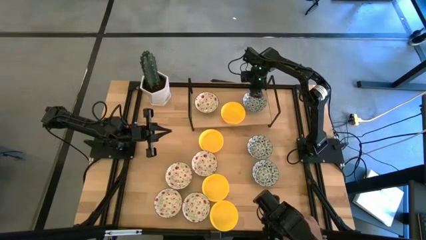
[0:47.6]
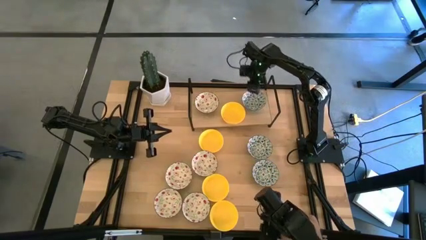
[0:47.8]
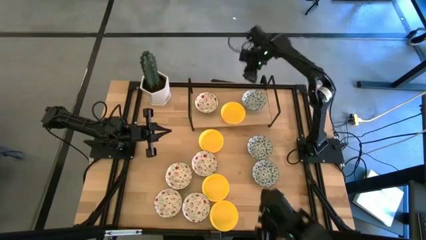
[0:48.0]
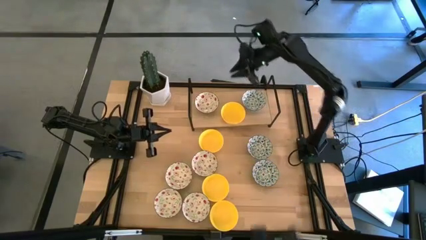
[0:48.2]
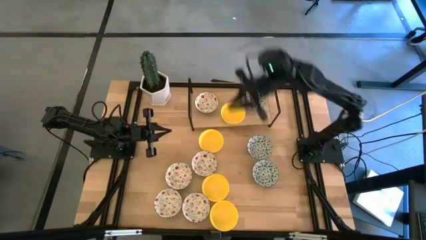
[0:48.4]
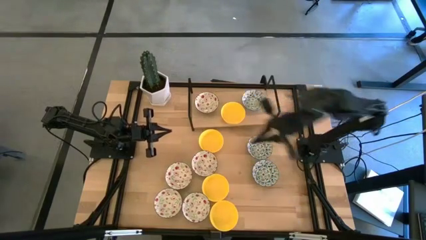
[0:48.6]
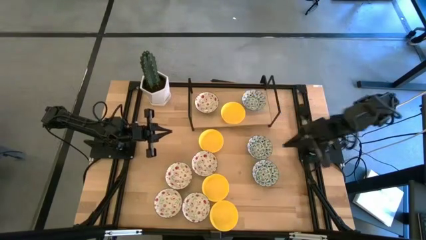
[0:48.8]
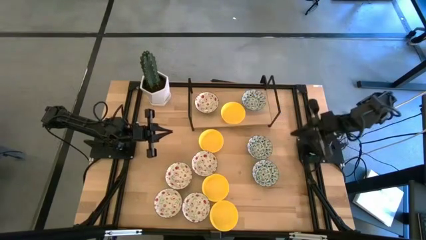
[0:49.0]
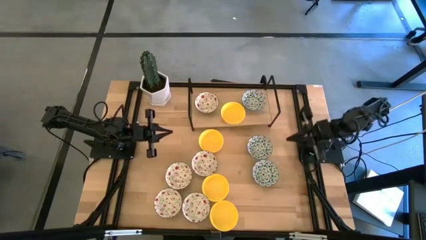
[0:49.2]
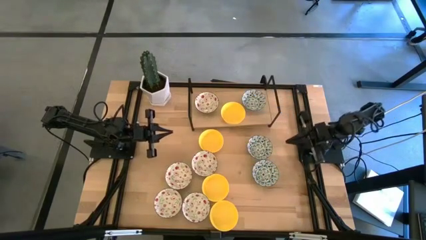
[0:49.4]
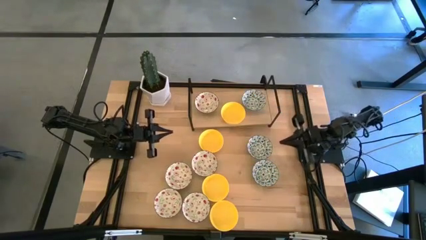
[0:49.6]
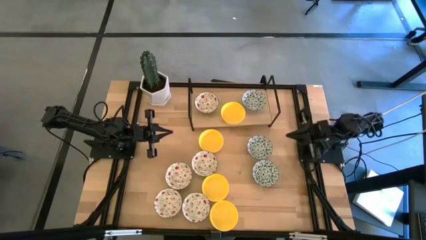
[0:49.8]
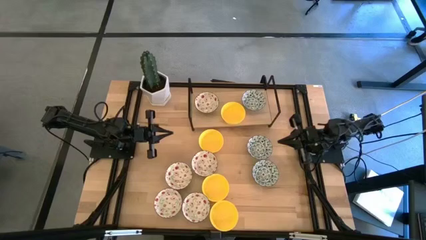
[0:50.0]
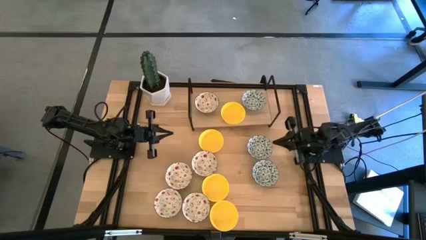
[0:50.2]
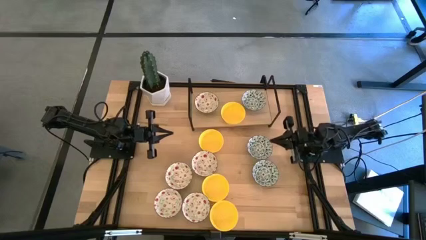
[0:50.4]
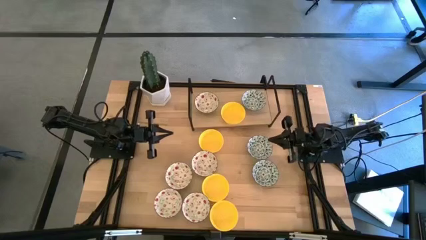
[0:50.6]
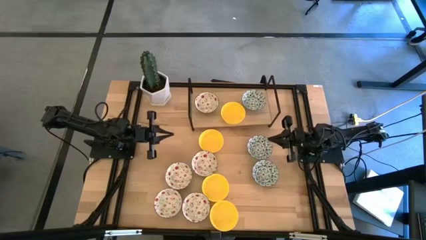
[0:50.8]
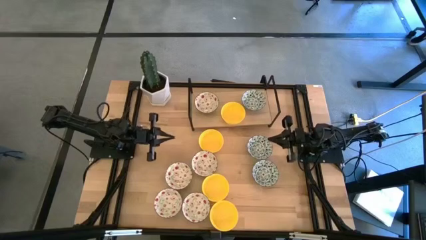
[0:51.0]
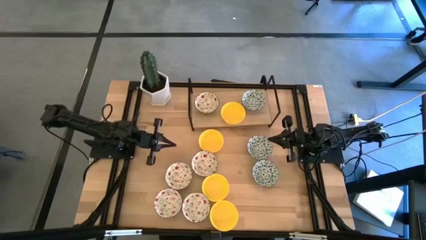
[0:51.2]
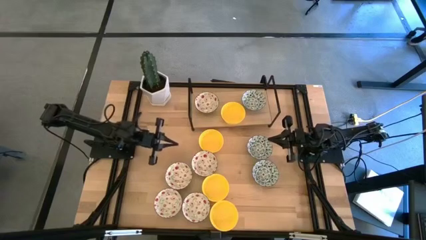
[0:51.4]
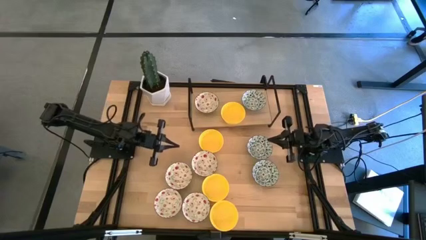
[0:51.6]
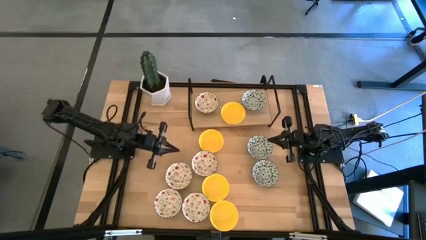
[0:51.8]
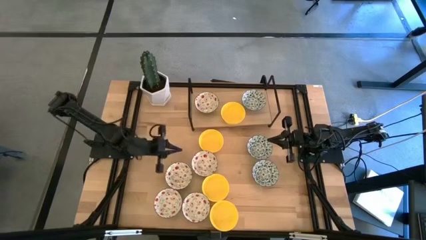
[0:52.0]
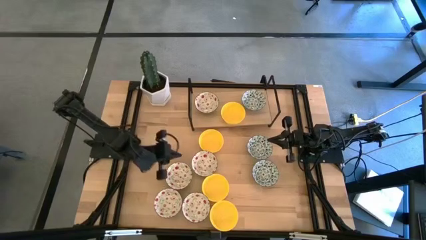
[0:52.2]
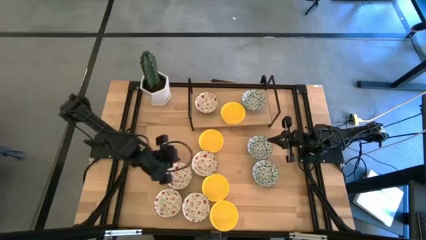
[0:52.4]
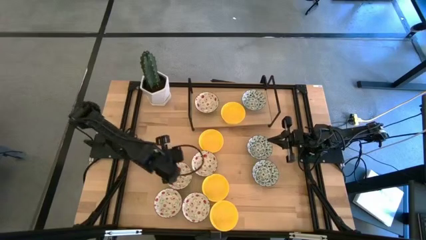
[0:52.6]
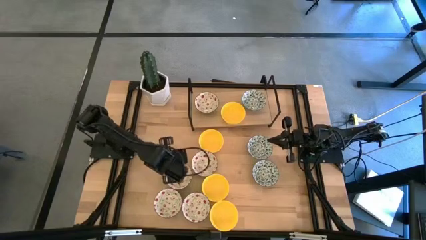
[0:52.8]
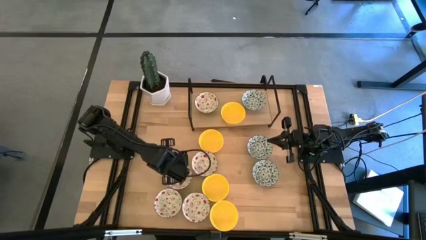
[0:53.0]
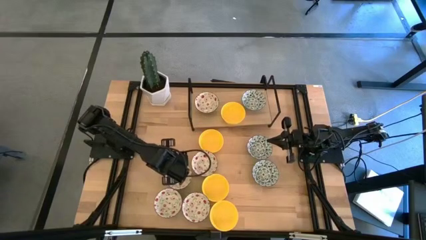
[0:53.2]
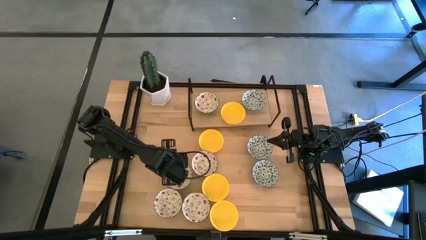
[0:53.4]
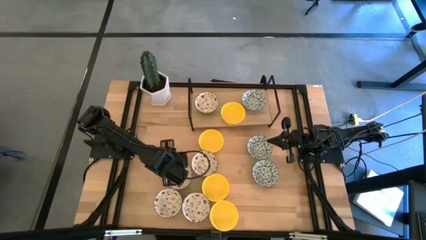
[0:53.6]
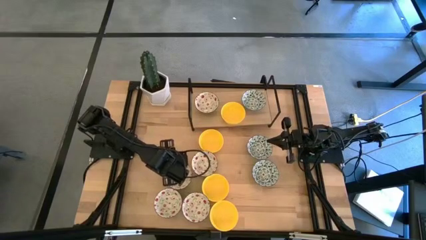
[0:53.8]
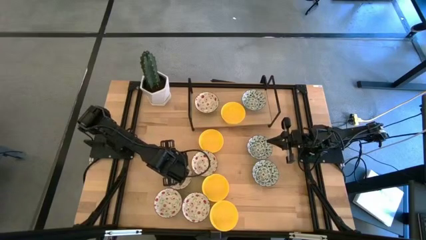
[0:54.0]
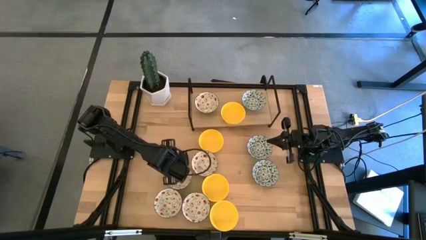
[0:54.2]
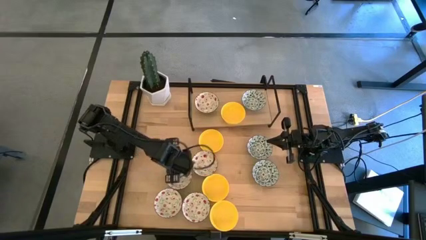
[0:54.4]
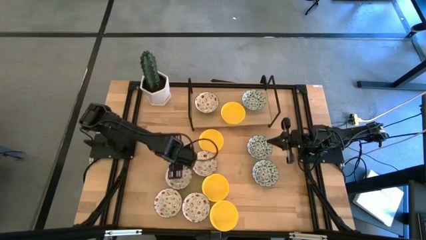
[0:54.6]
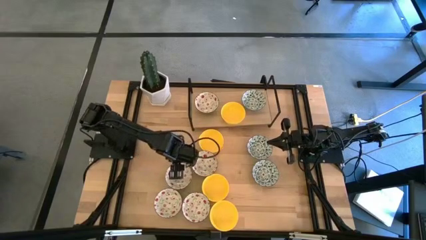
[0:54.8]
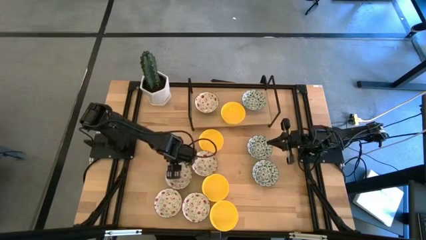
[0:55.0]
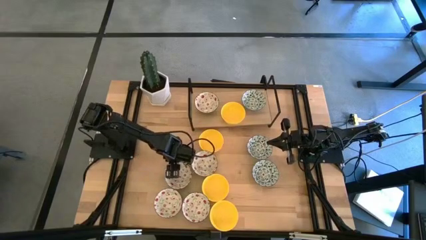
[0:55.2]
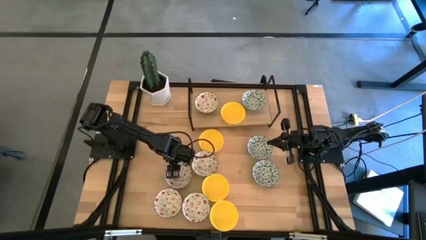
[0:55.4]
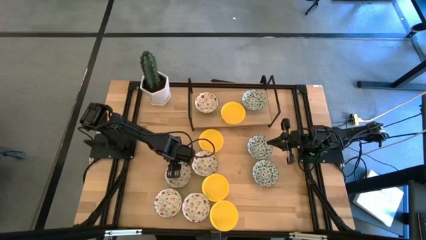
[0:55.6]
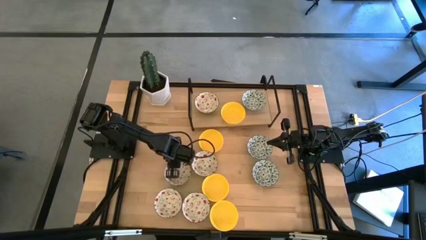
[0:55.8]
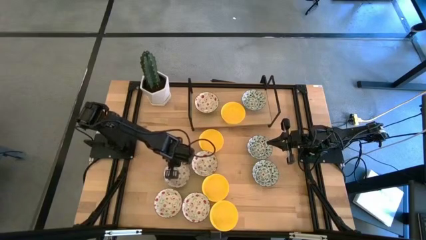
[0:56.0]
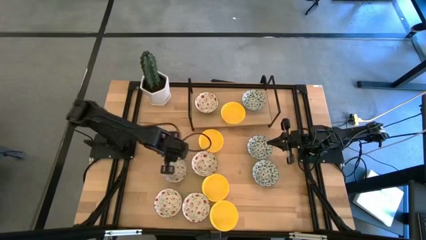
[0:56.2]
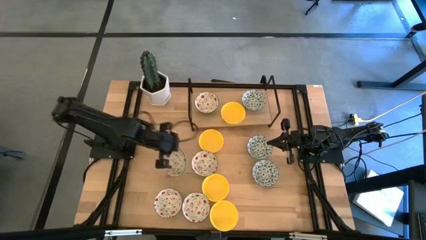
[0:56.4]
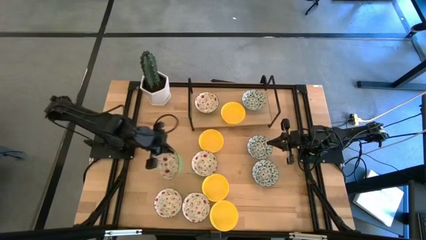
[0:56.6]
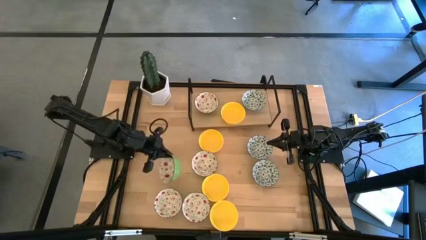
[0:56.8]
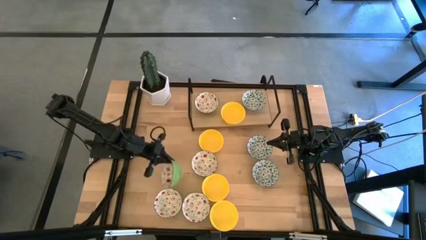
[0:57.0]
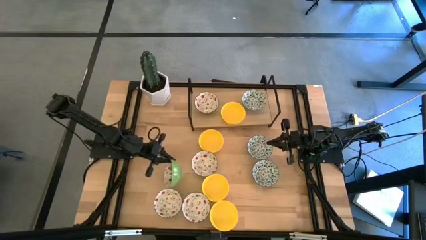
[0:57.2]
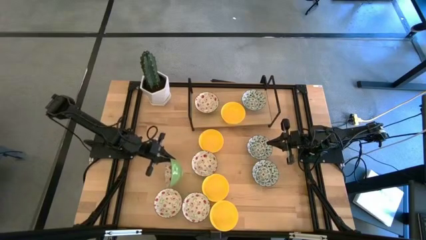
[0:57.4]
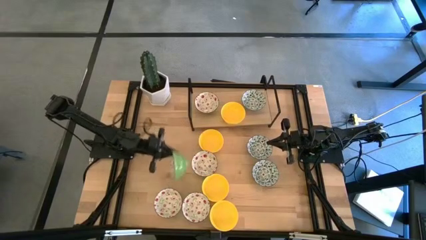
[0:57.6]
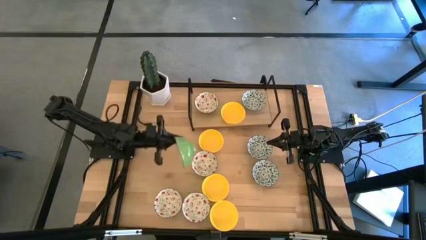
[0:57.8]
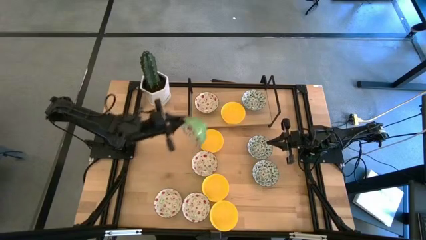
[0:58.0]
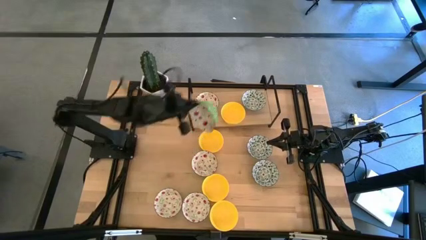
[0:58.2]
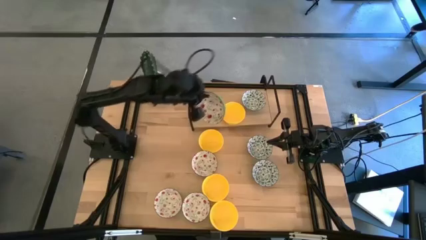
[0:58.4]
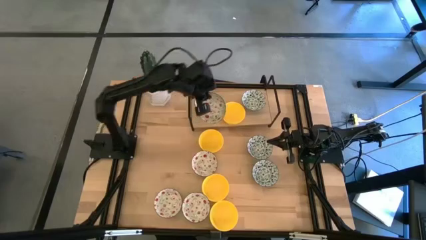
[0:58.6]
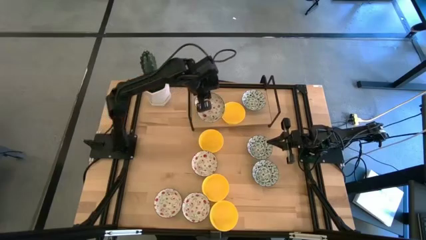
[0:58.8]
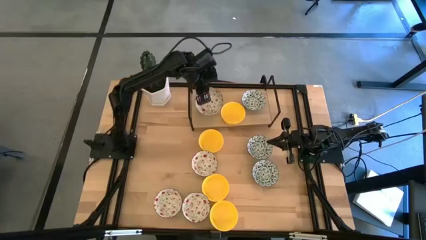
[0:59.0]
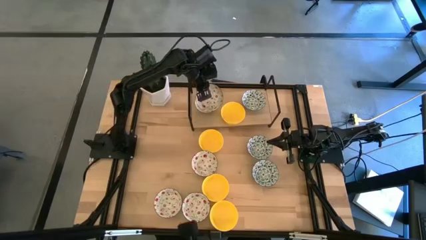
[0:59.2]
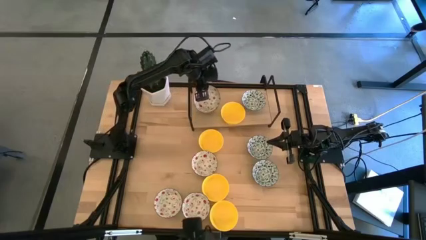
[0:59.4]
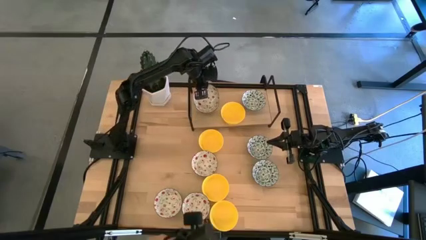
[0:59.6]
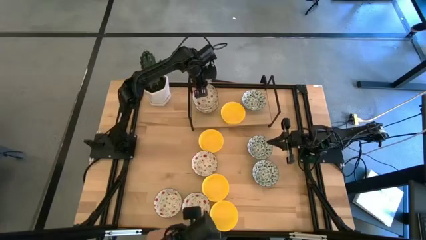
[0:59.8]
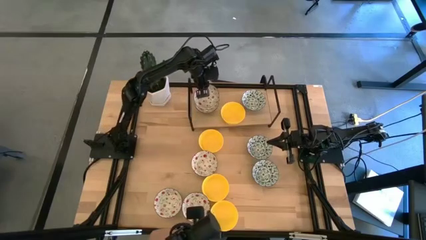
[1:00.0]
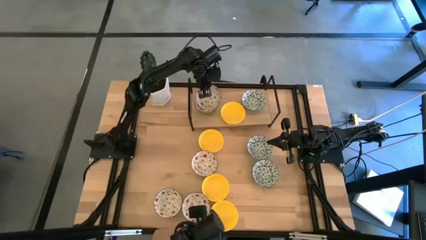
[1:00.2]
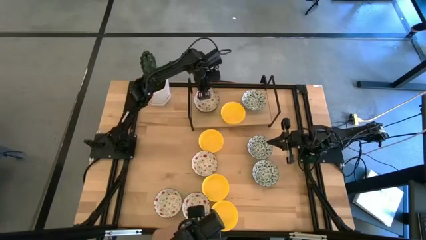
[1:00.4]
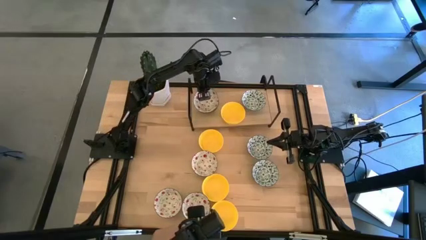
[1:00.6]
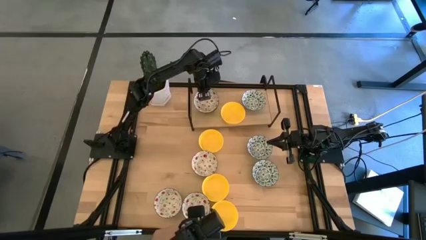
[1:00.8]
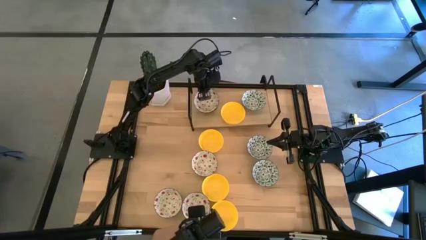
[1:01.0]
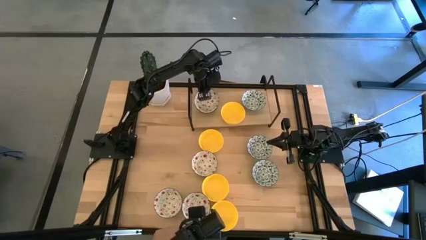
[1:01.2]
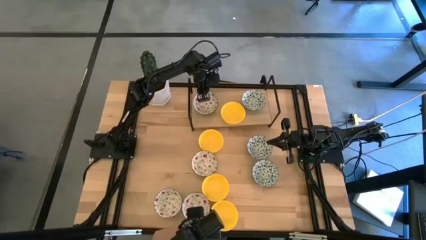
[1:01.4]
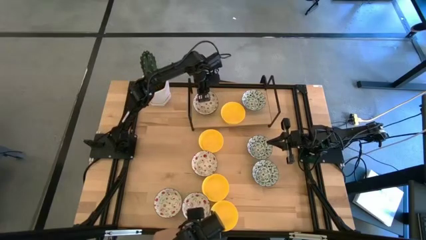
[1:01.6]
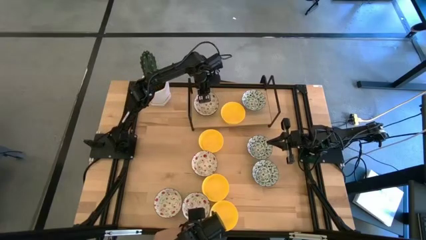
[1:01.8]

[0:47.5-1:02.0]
Task: Pick & Place Mini bowls
Stack the green patterned bowl on the green patterned bowl on the shelf
